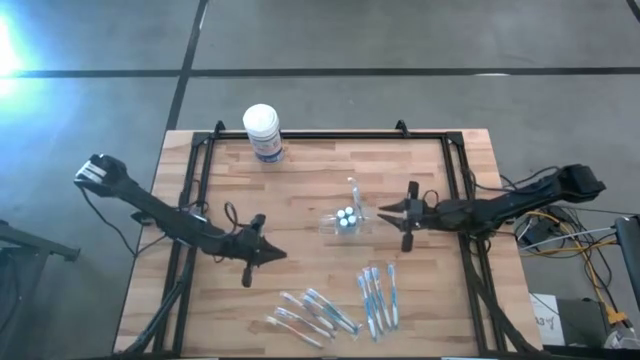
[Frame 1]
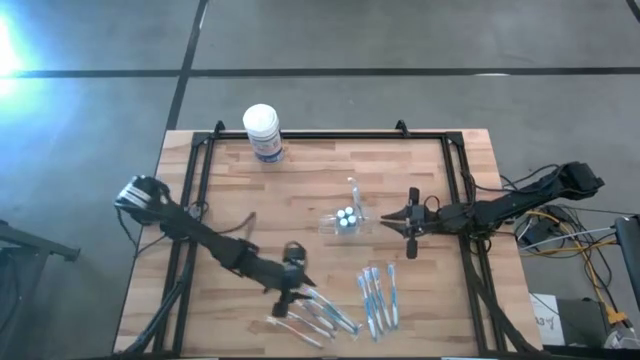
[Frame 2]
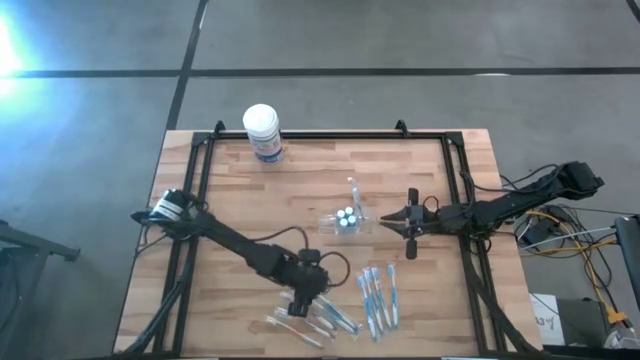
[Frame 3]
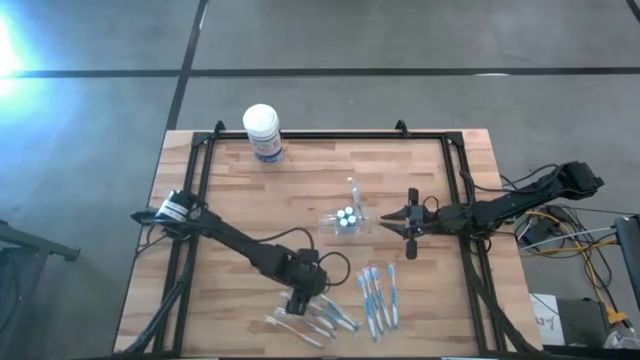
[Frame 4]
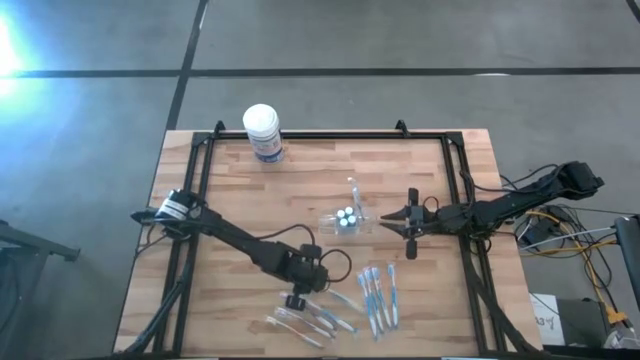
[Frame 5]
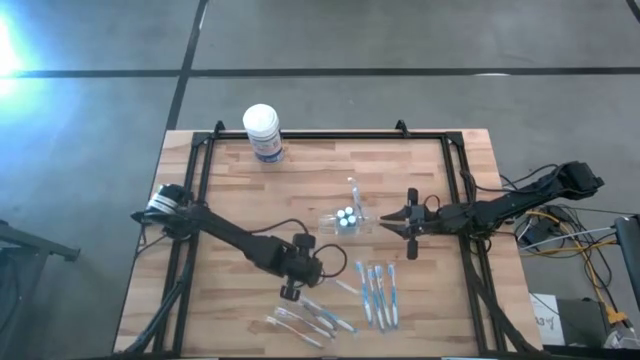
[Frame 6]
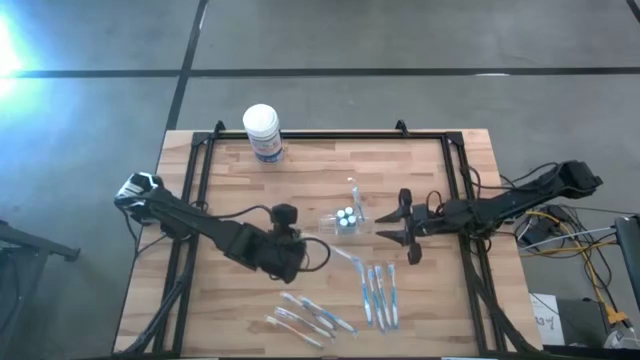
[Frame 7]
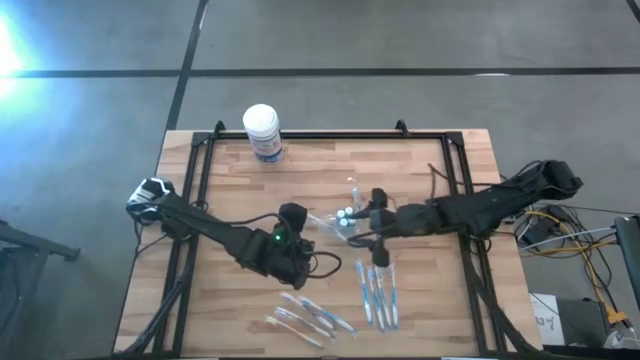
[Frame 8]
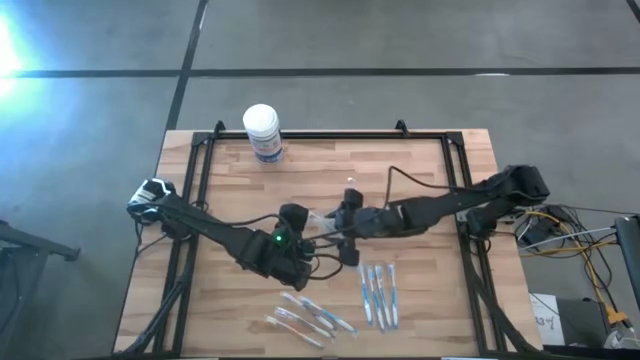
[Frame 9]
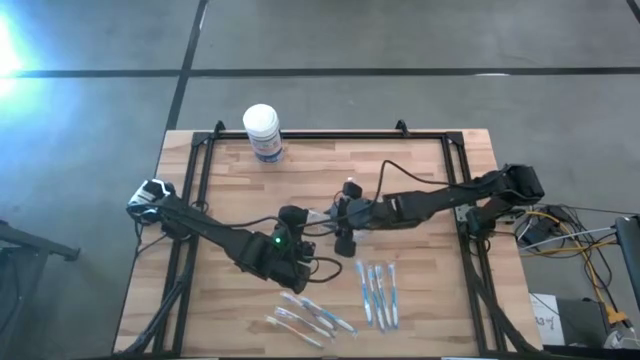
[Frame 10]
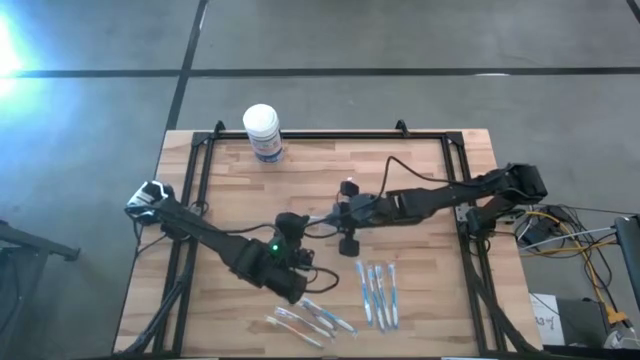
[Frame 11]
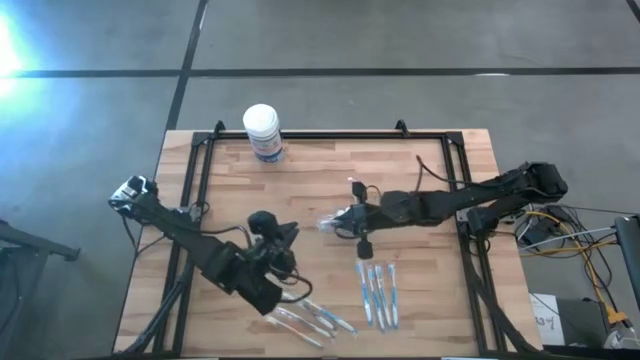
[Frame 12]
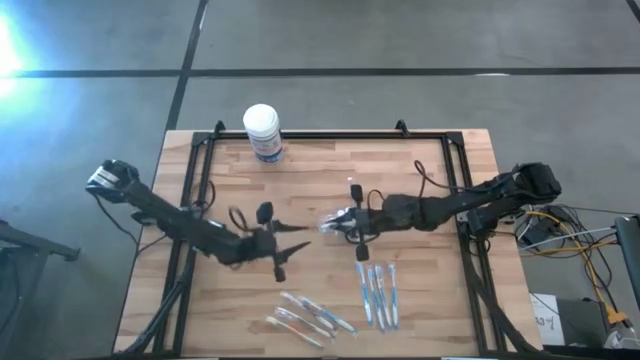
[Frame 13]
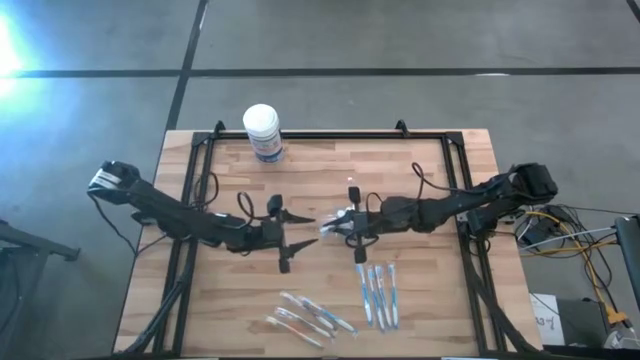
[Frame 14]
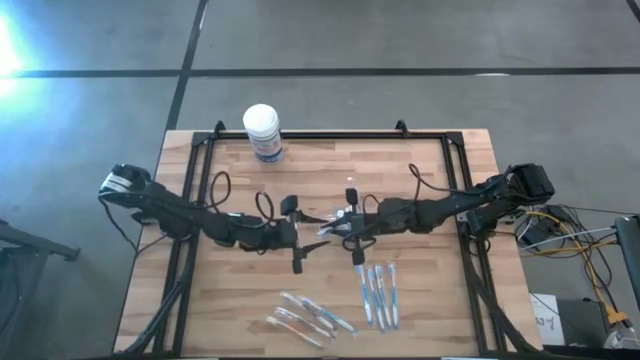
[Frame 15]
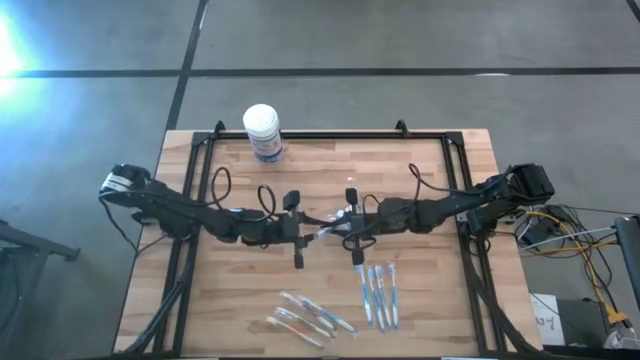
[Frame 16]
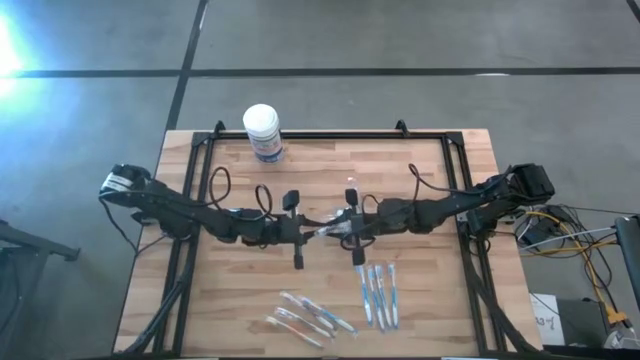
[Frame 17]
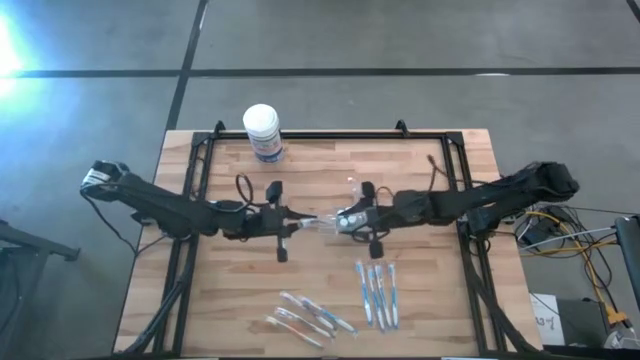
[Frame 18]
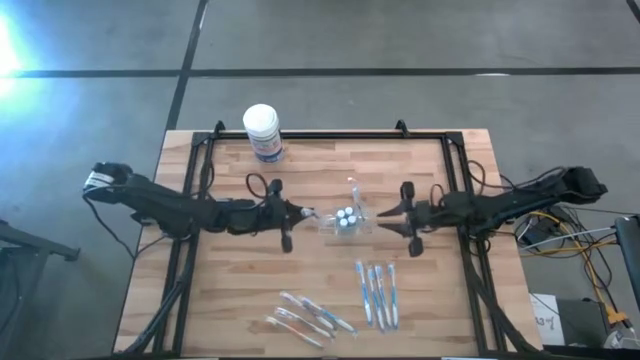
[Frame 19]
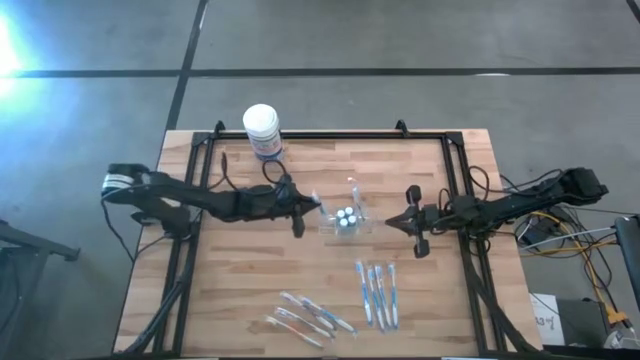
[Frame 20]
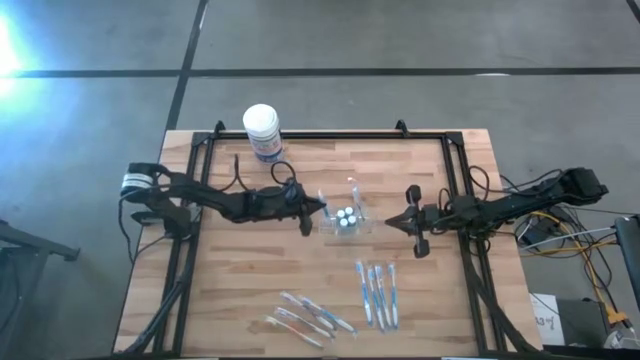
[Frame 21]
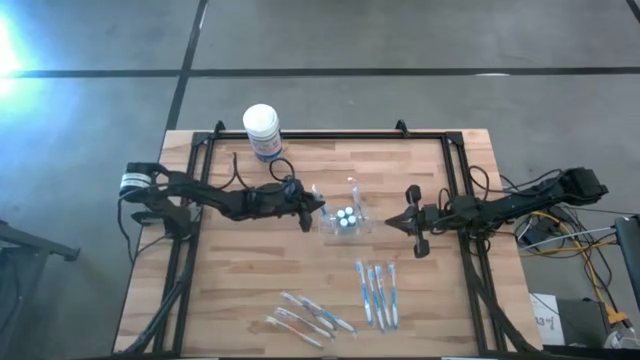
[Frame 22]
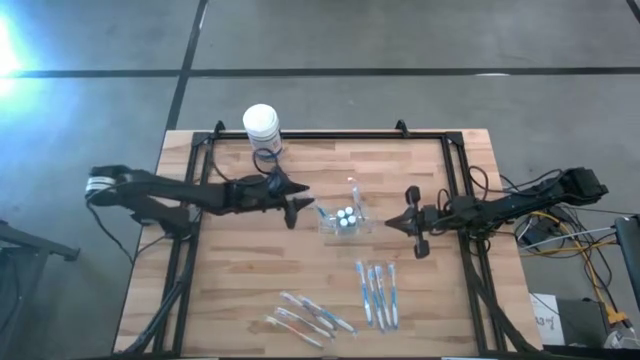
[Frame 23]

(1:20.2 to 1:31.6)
Task: Pick & Place toothbrushing station
Put the blue toothbrush into the transparent organizer

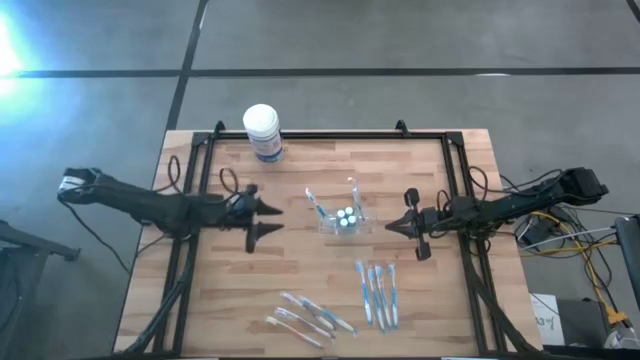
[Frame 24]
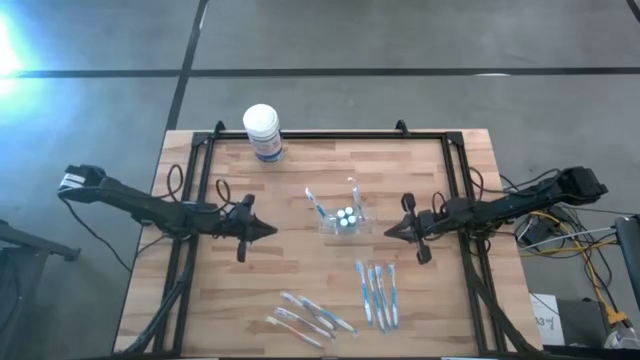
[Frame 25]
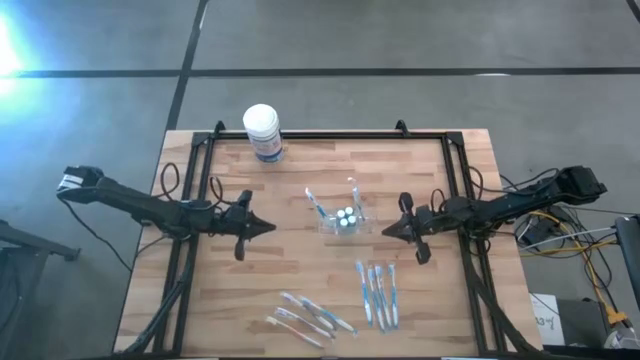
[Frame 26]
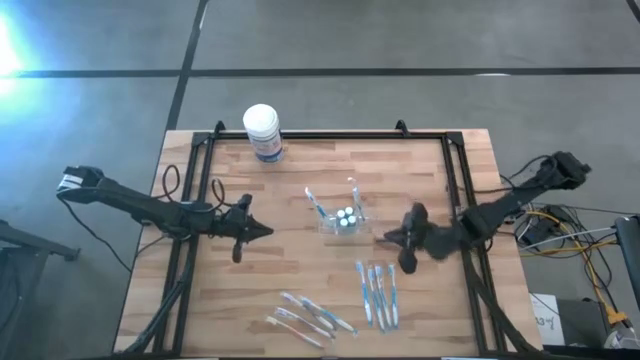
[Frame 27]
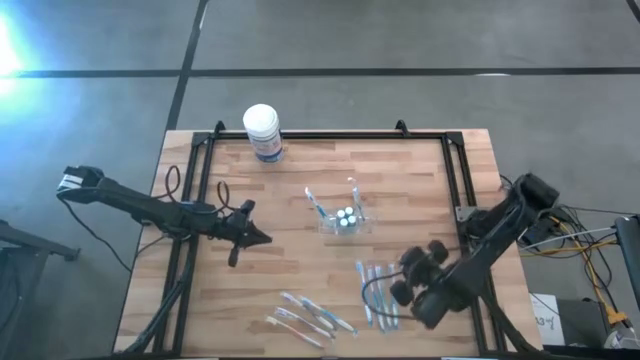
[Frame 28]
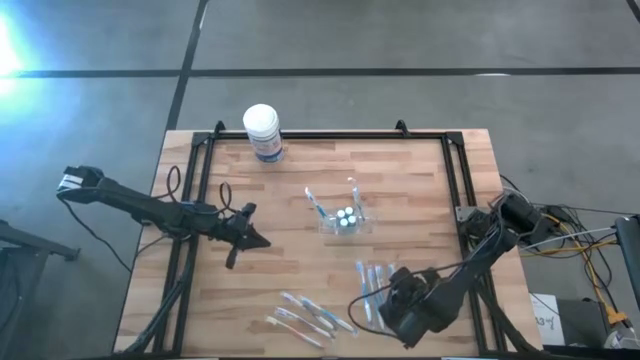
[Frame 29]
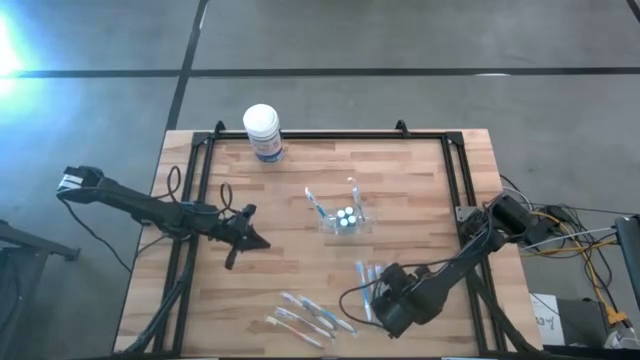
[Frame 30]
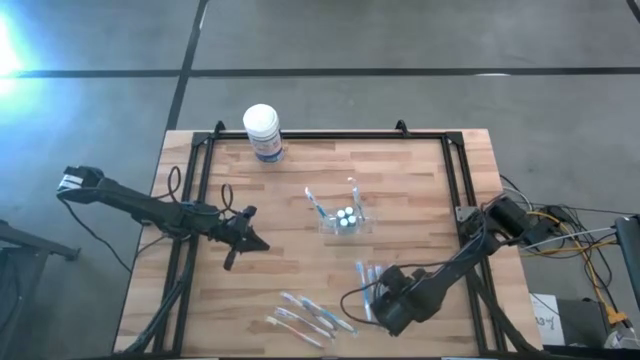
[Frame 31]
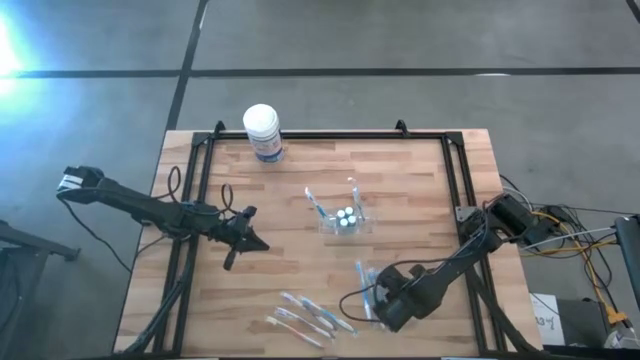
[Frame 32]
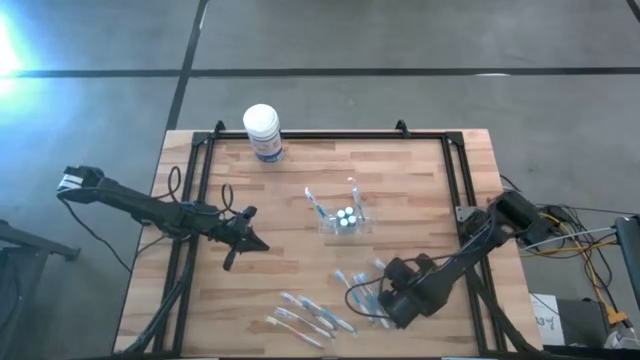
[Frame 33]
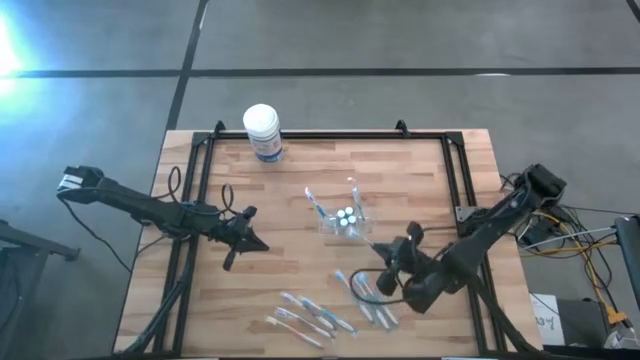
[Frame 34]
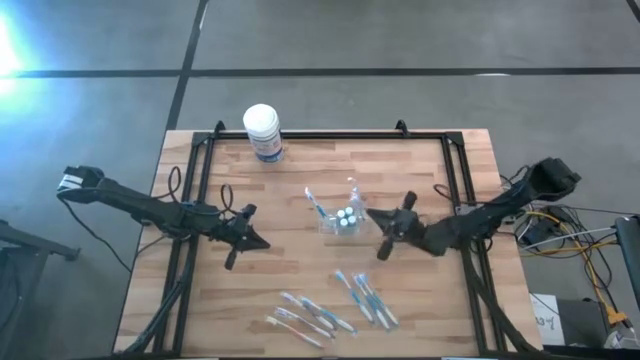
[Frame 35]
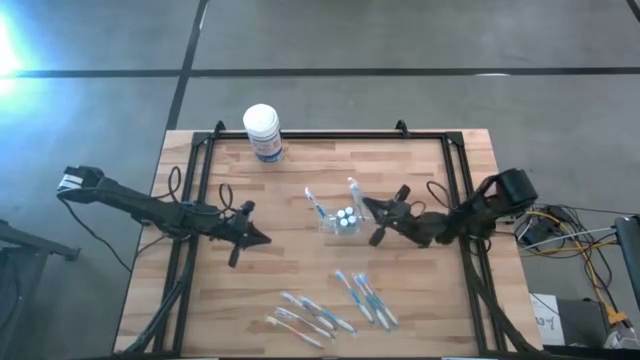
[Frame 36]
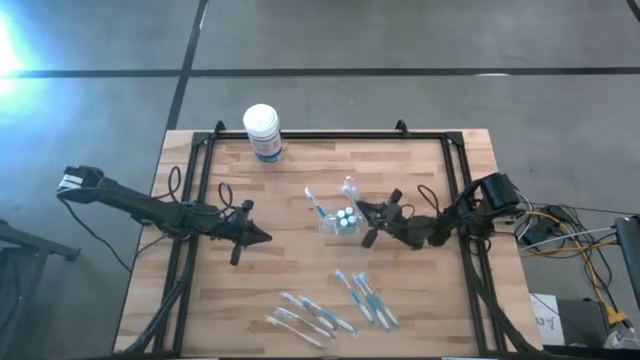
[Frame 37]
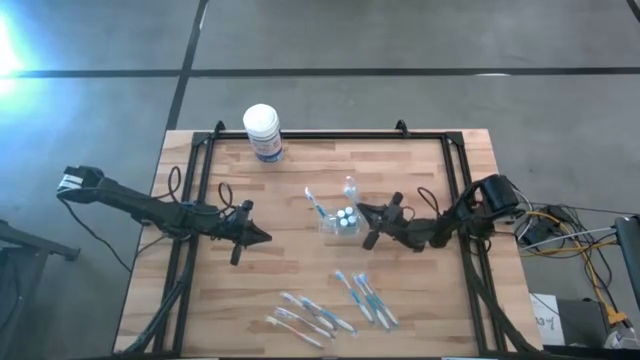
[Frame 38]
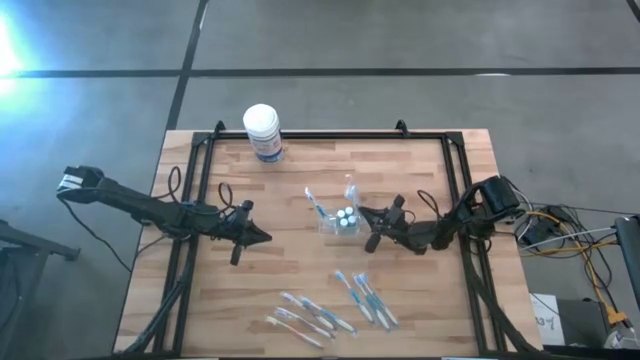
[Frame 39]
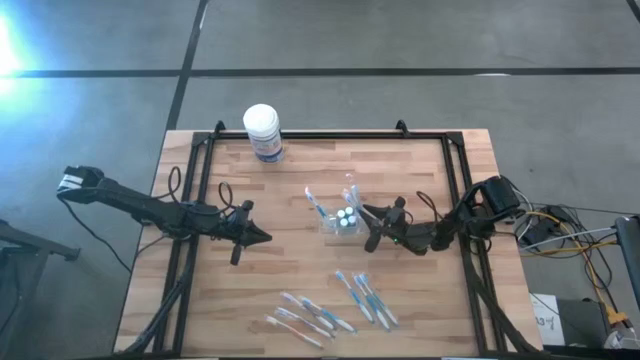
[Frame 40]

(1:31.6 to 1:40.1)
Put the blue toothbrush into the transparent organizer
